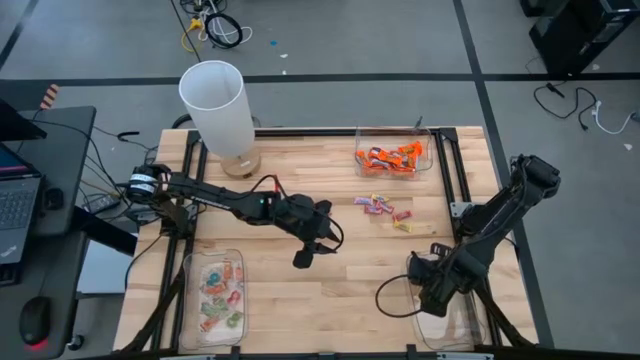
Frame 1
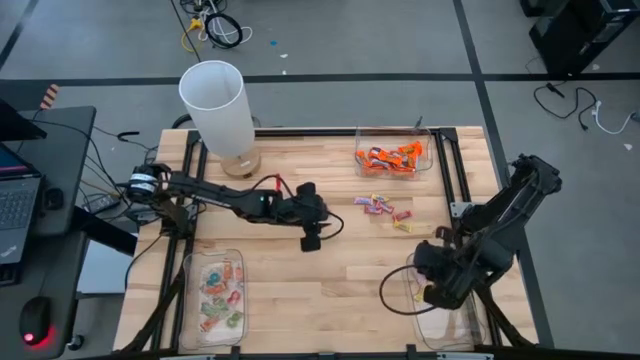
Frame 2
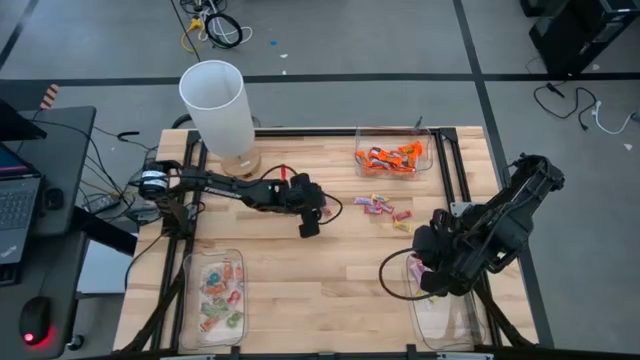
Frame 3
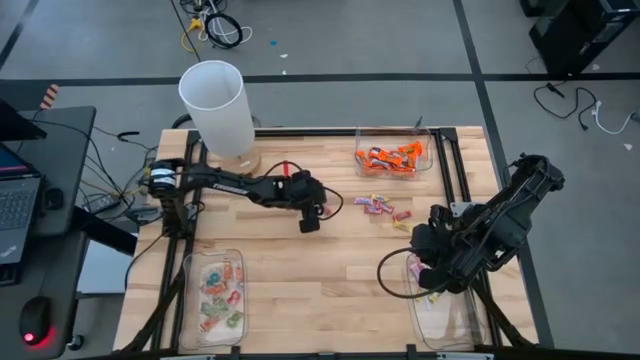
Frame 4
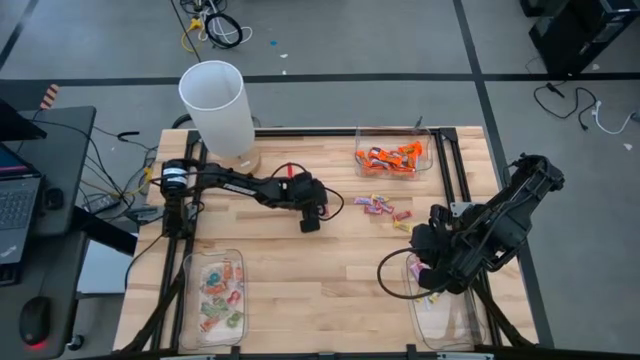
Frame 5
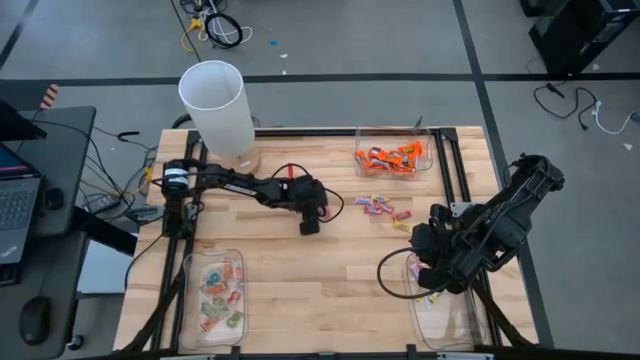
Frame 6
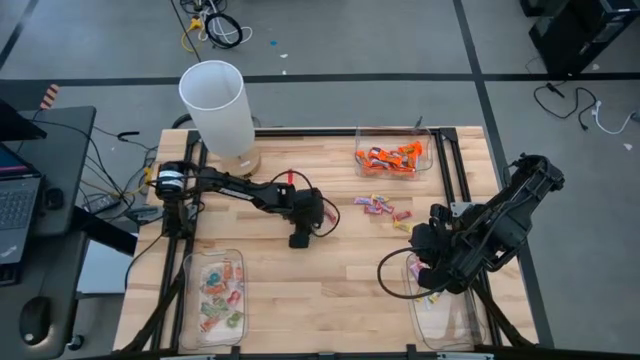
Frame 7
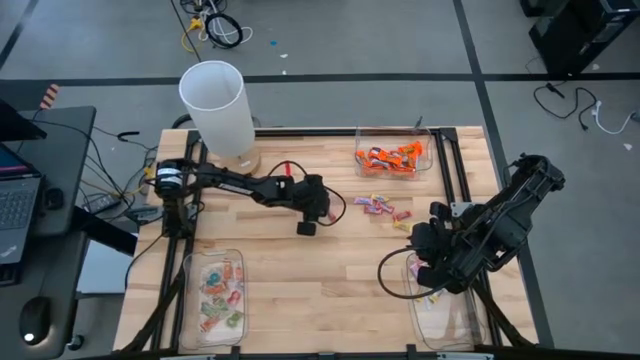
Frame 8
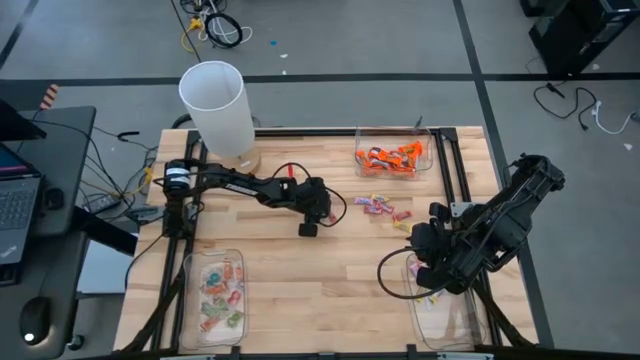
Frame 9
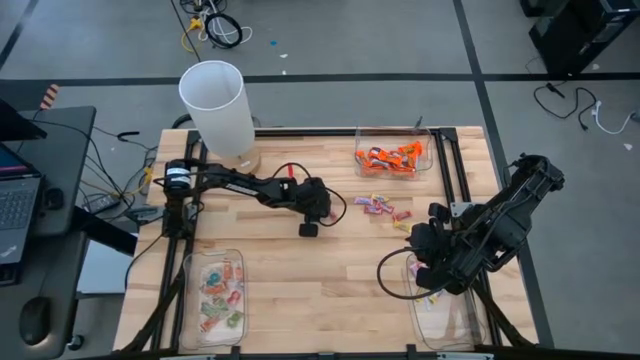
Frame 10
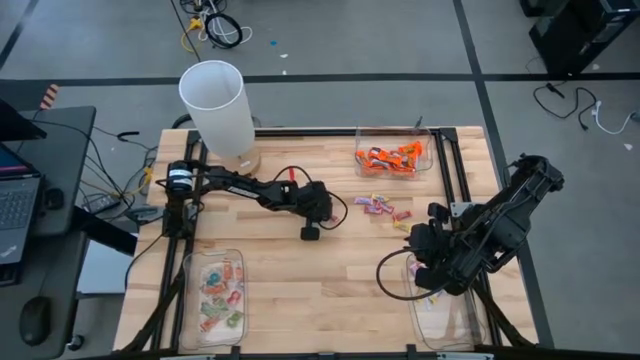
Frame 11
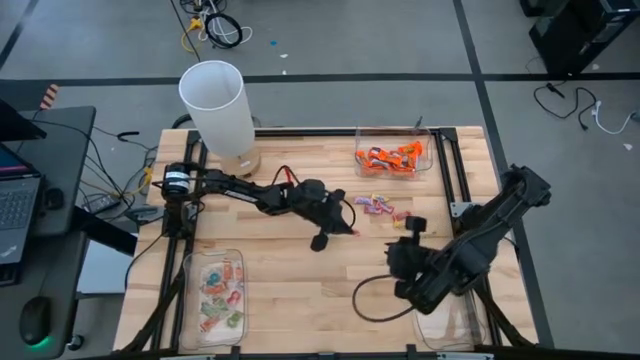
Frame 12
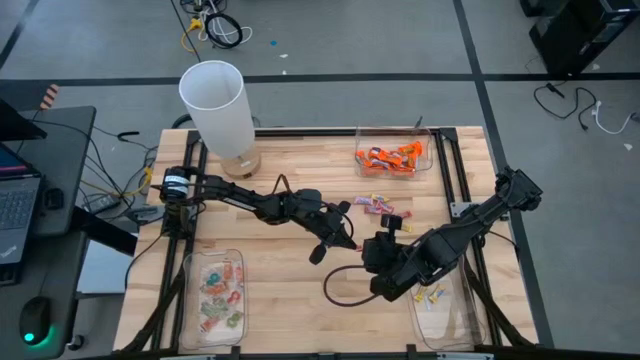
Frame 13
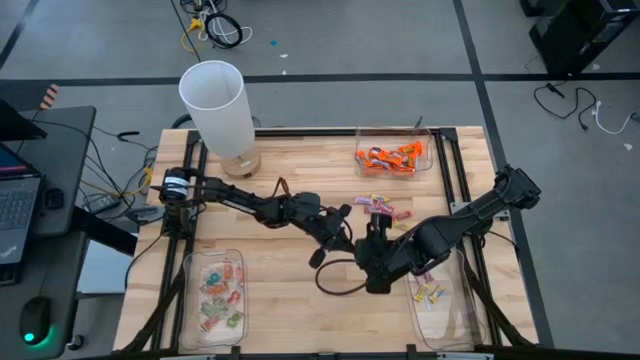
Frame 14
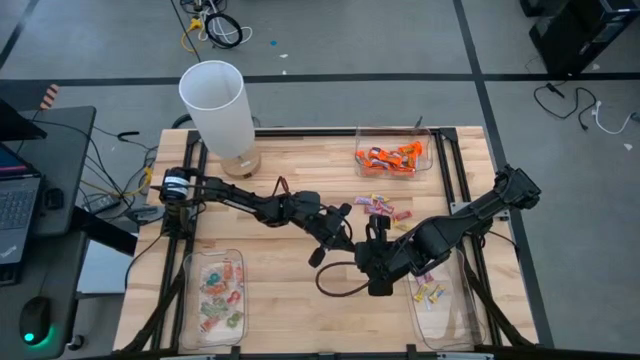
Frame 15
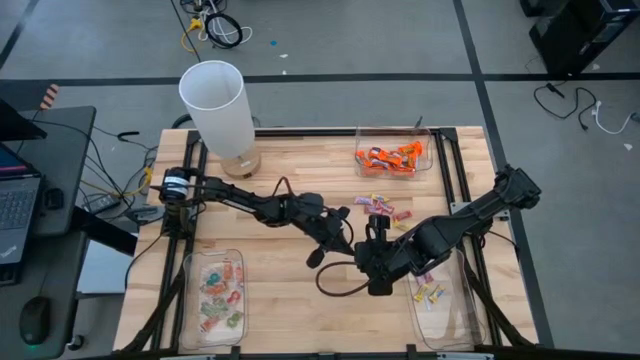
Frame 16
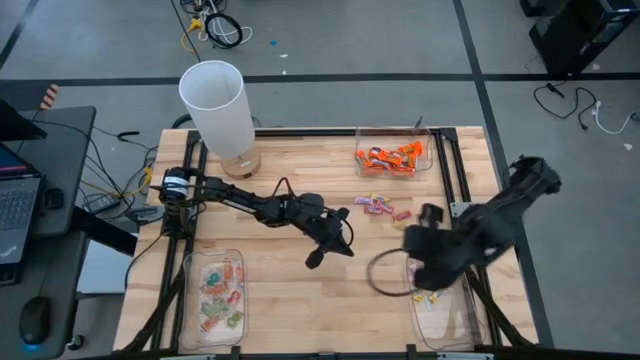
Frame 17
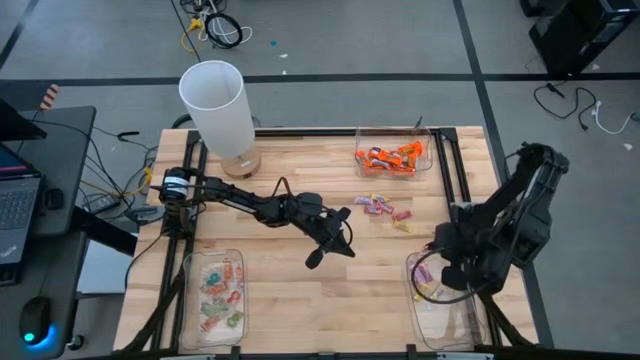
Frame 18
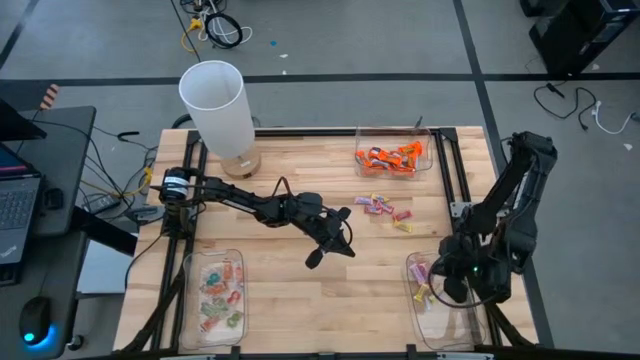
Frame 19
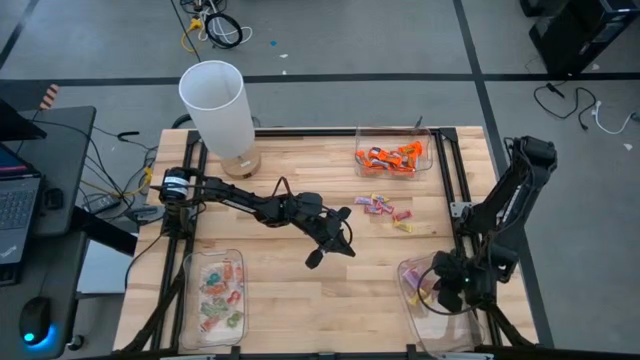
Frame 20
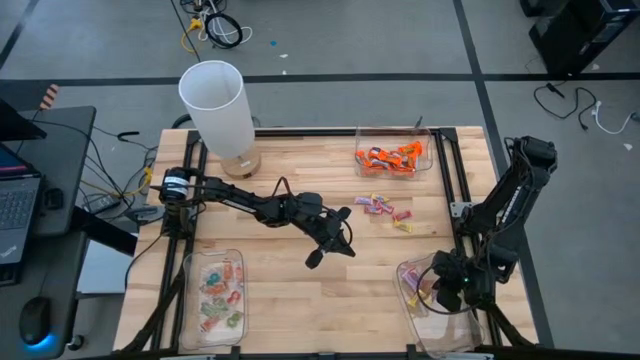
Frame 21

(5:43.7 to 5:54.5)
Task: Sort candy
Put the red candy into the bottom right transparent bin

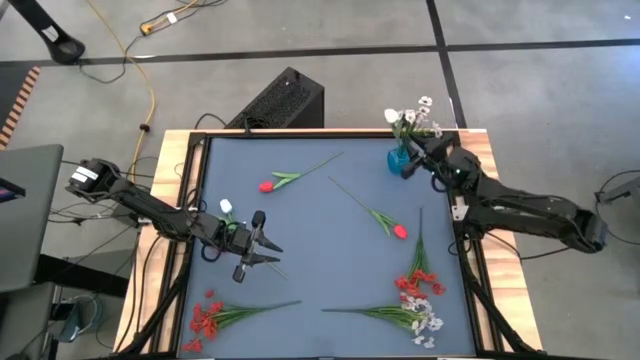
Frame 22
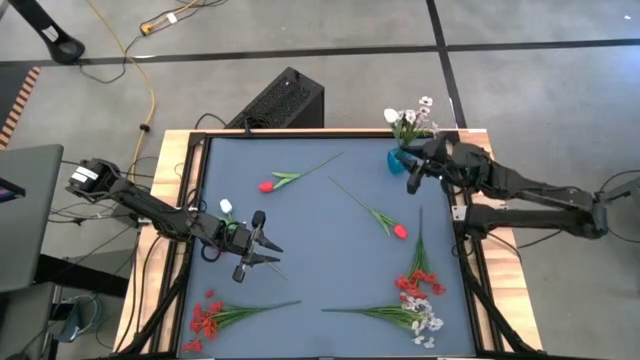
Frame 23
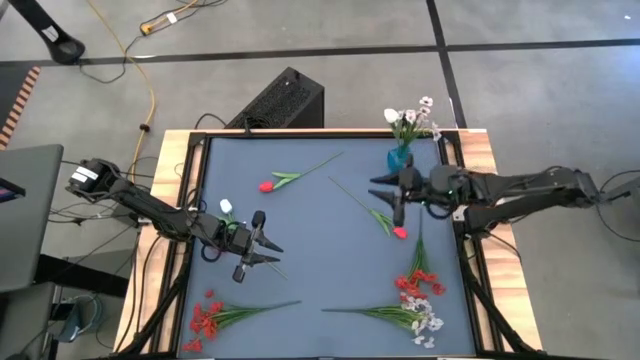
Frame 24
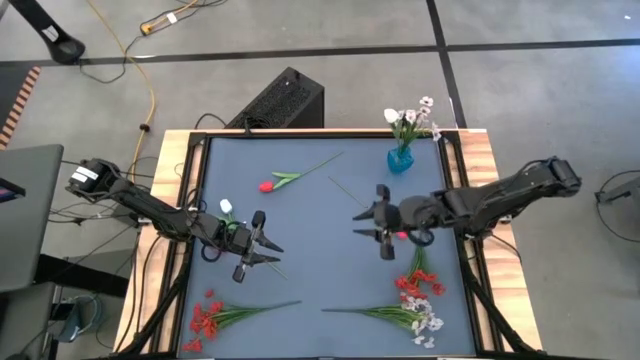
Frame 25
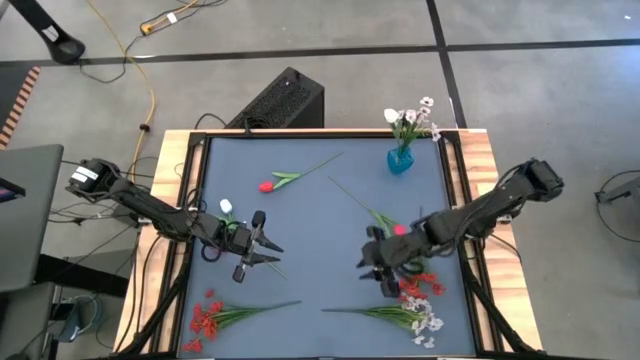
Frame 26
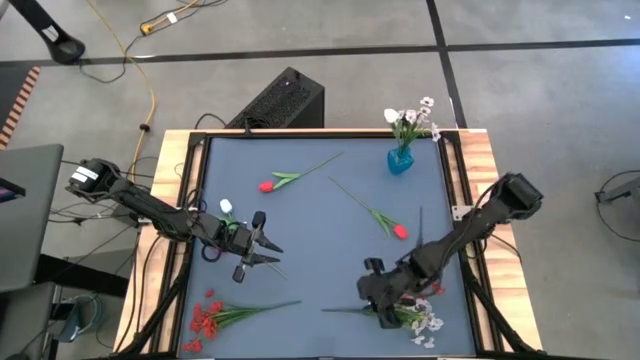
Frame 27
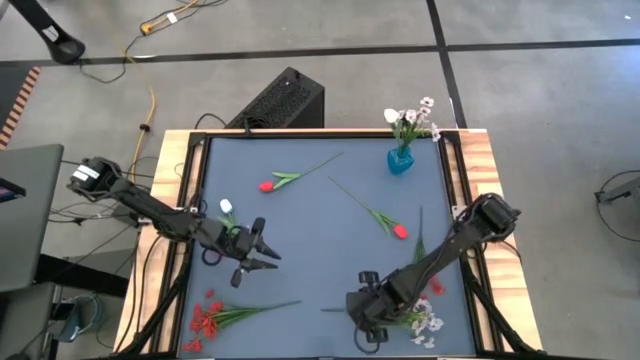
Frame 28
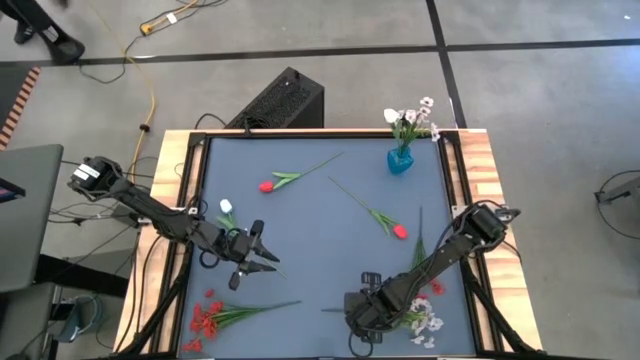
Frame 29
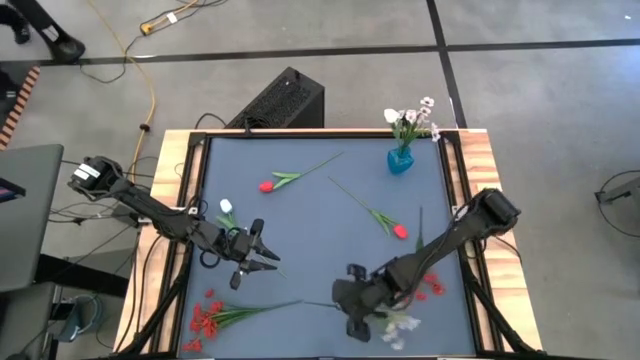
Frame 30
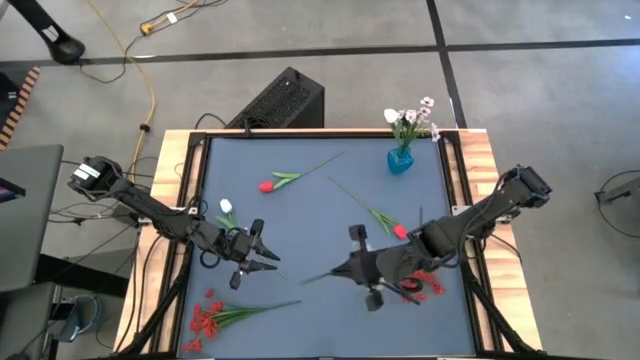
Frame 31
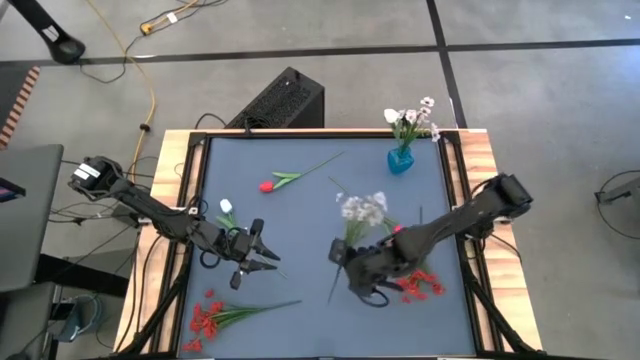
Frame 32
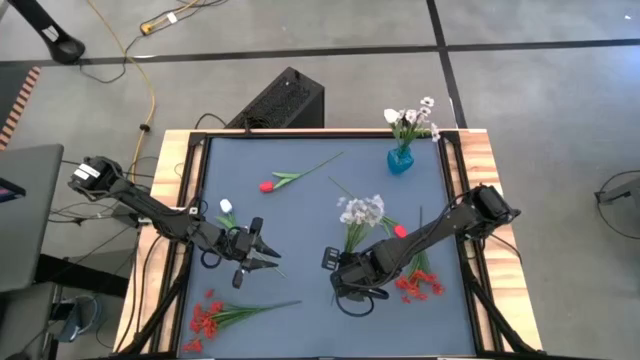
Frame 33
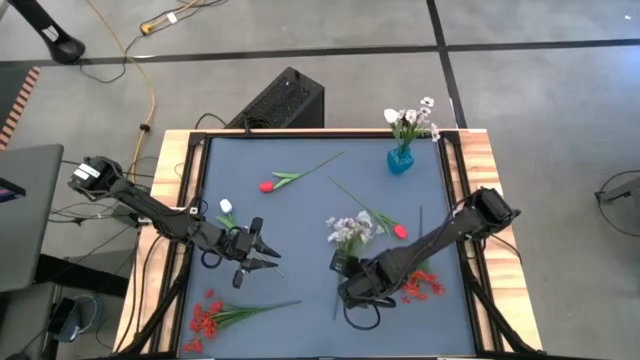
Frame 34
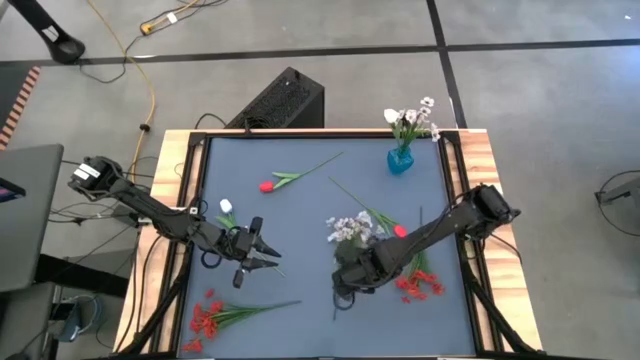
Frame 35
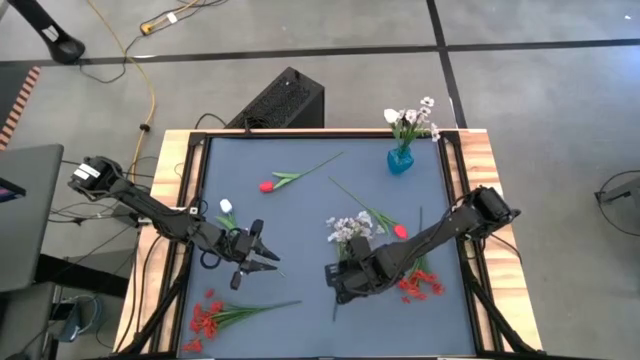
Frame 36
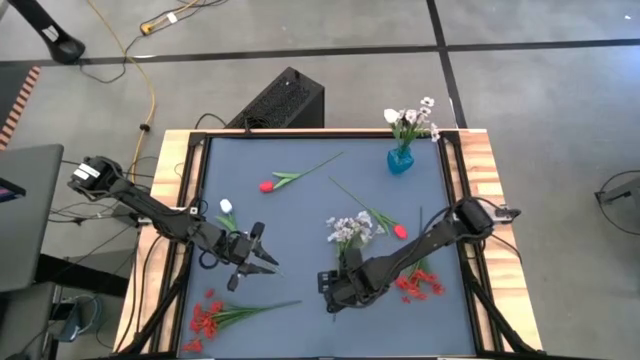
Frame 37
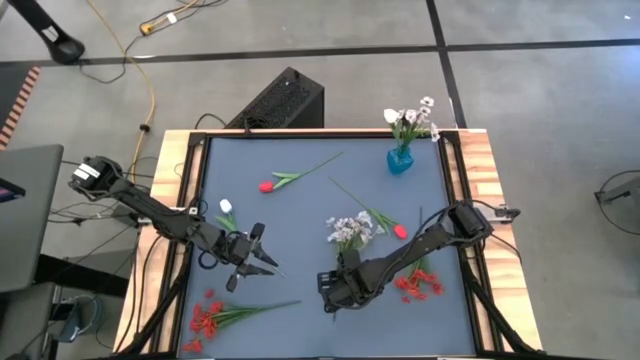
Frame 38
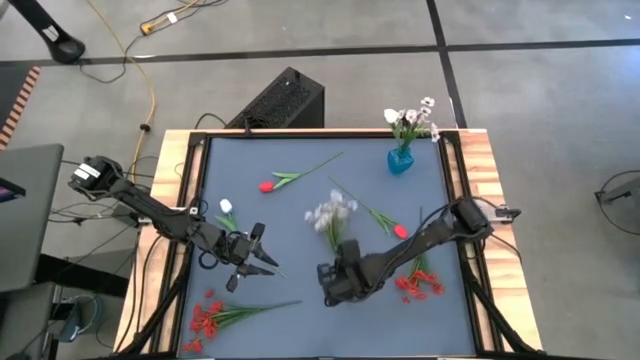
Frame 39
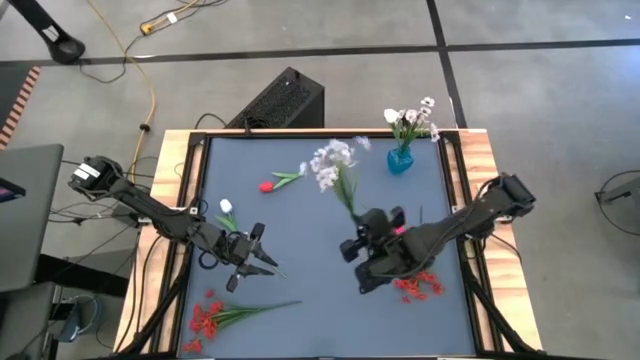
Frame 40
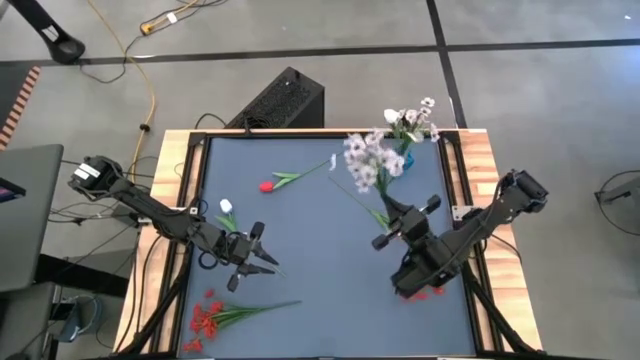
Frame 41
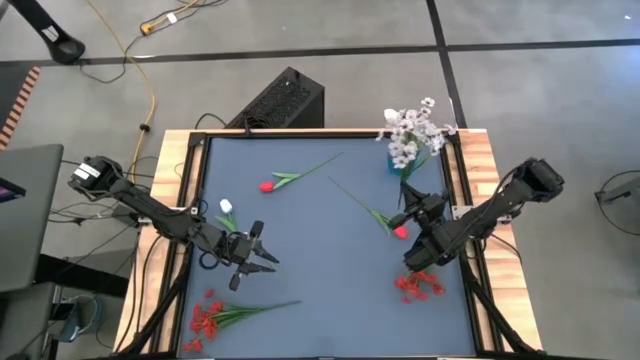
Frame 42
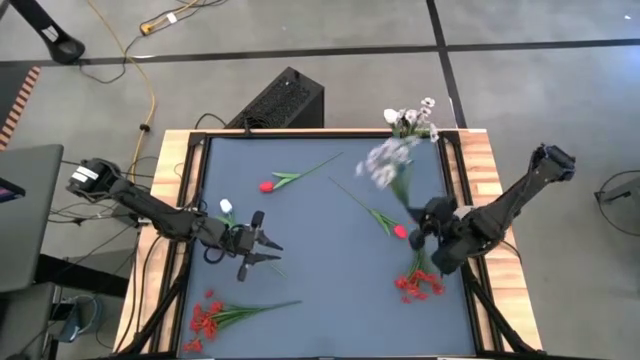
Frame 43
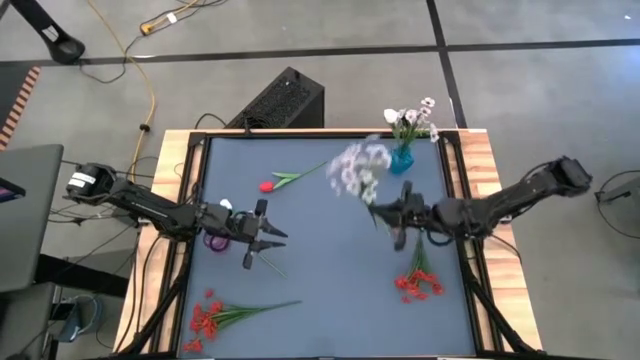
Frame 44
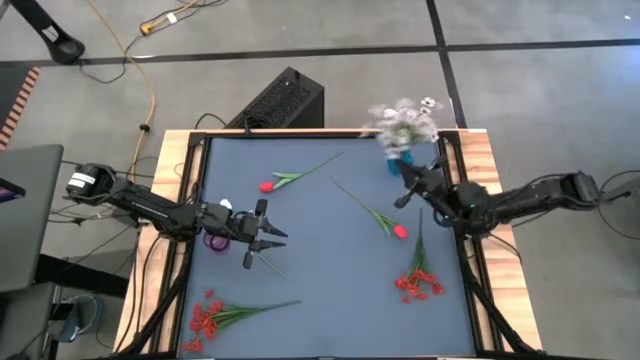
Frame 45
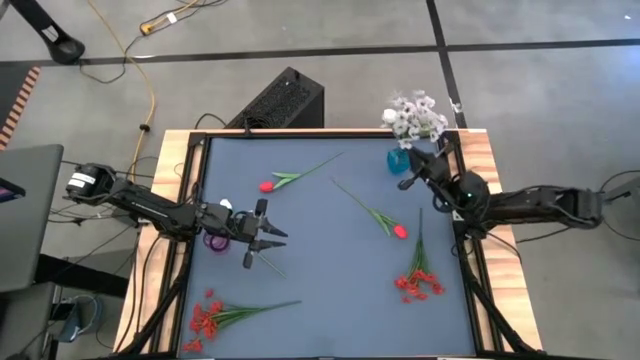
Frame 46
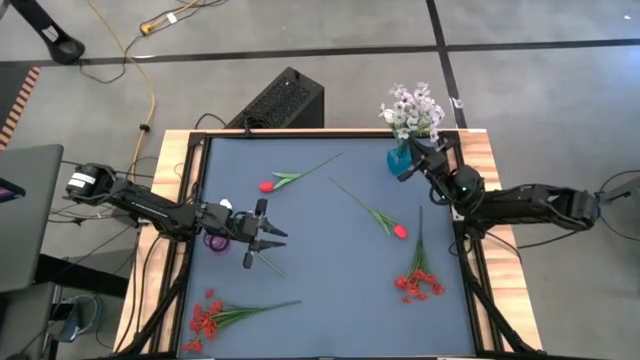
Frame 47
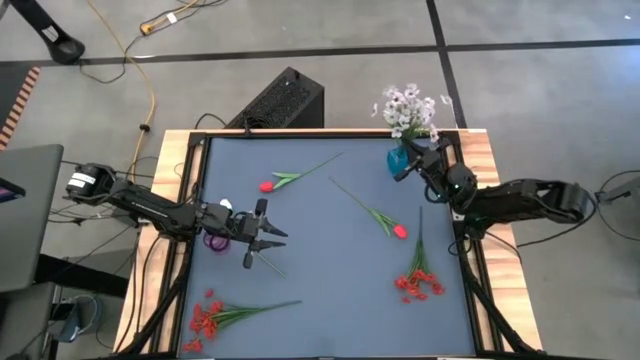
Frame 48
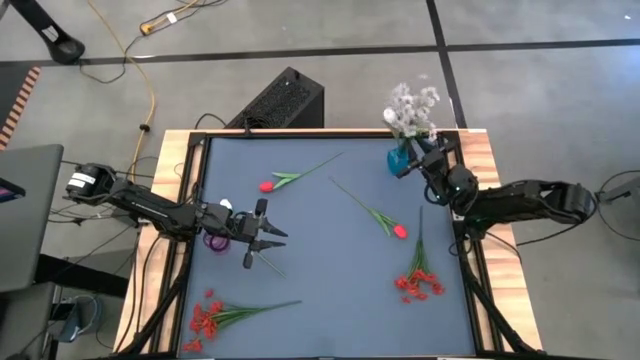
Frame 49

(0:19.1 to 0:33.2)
Task: Sort flowers into vase by color
Put the white flowers into the blue vase
